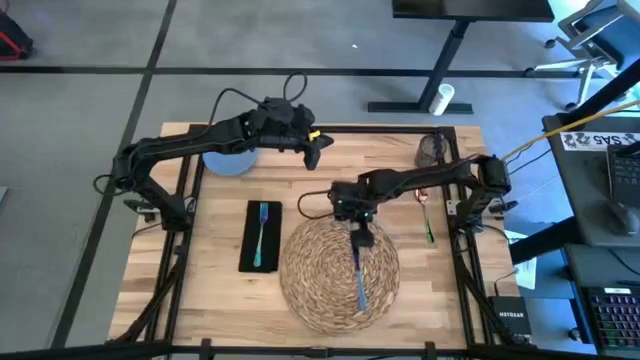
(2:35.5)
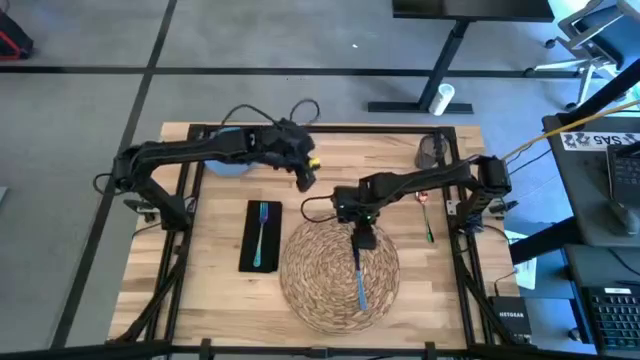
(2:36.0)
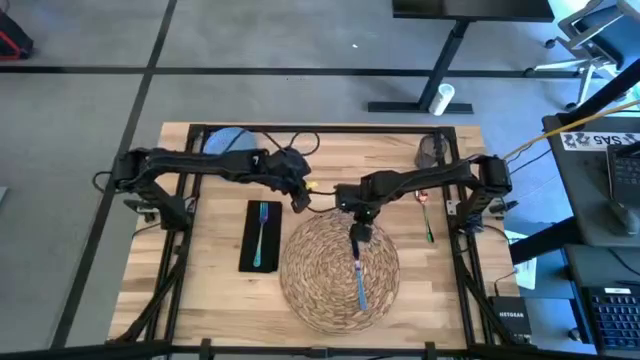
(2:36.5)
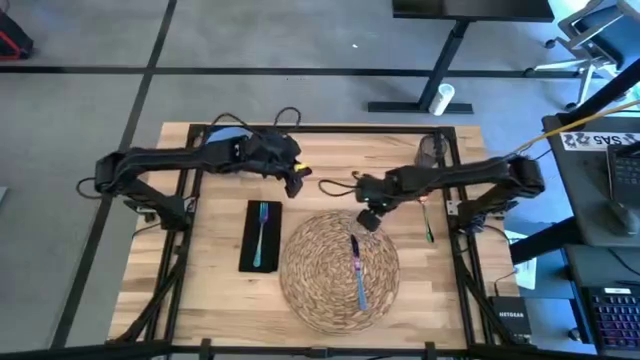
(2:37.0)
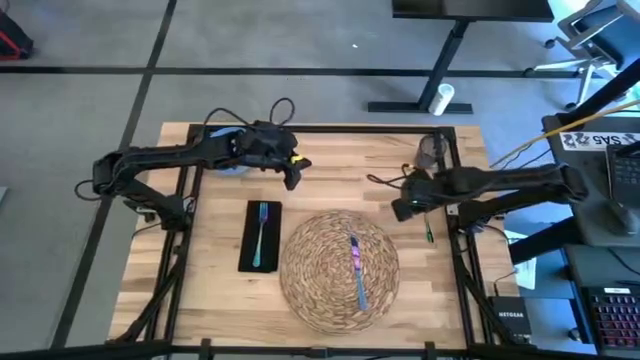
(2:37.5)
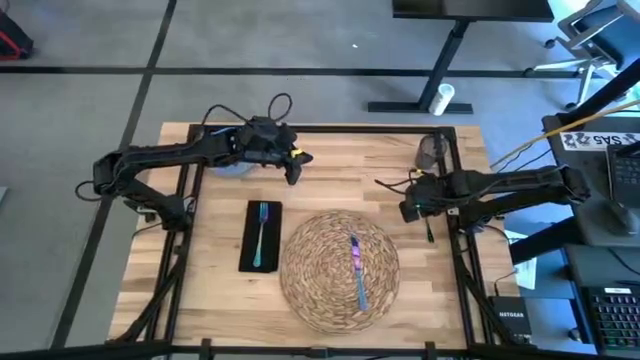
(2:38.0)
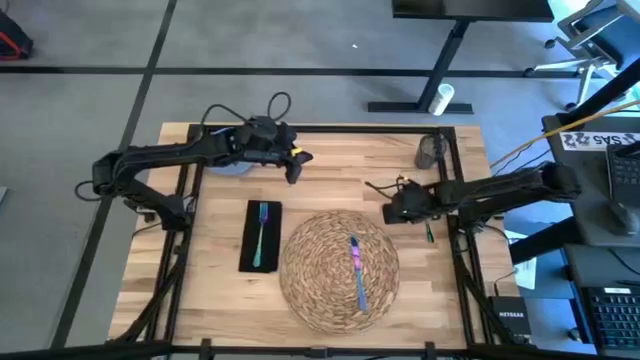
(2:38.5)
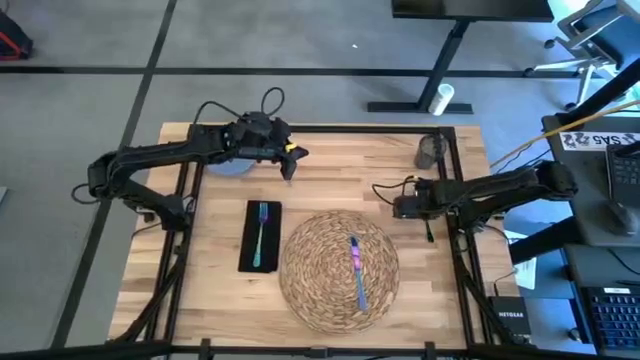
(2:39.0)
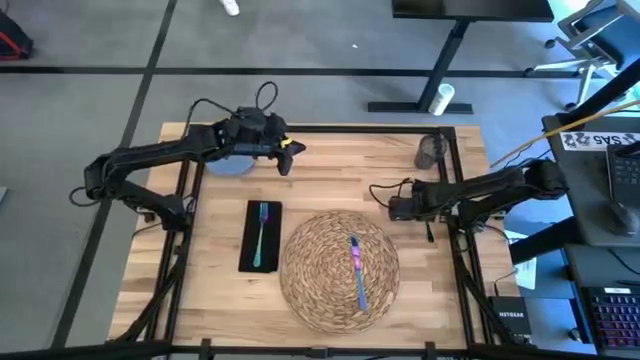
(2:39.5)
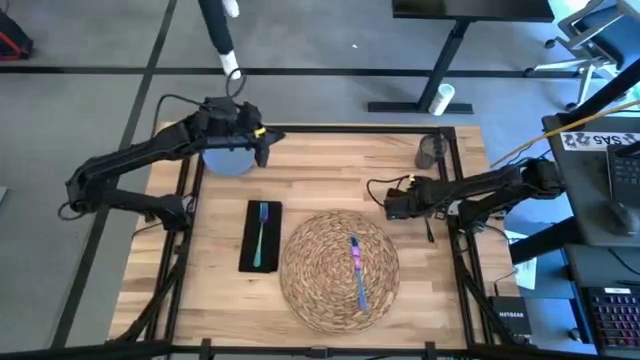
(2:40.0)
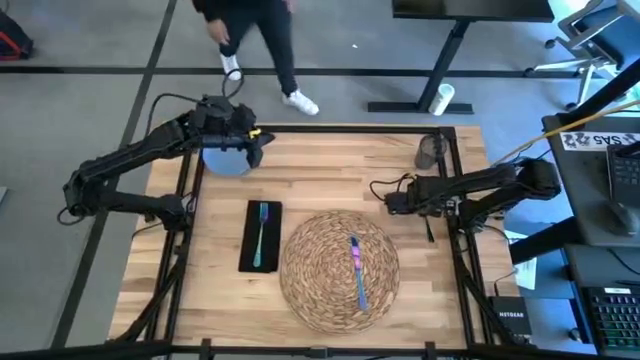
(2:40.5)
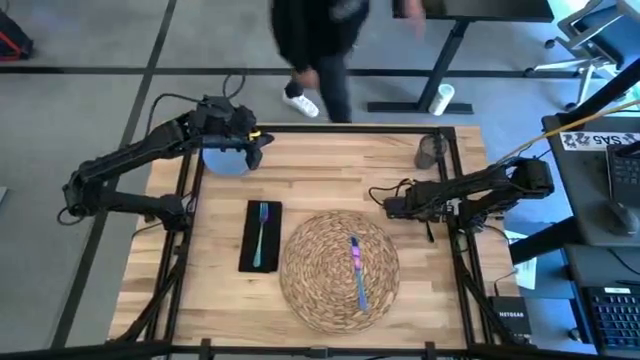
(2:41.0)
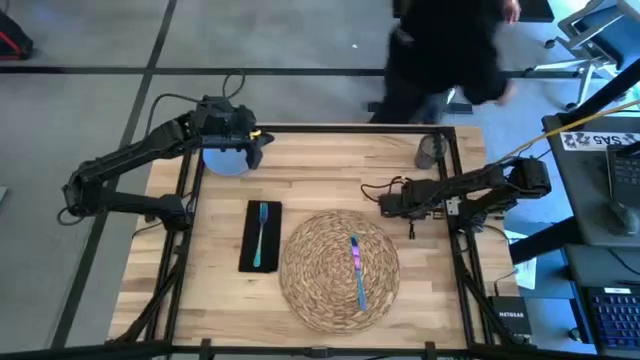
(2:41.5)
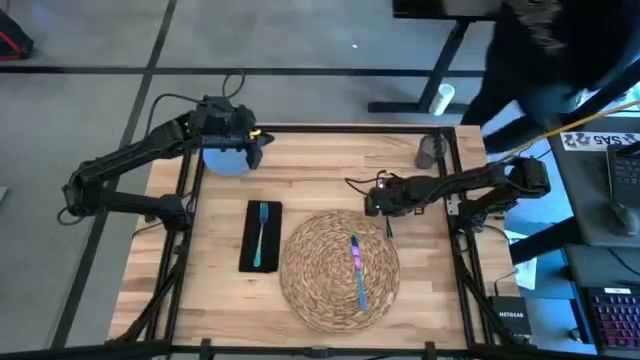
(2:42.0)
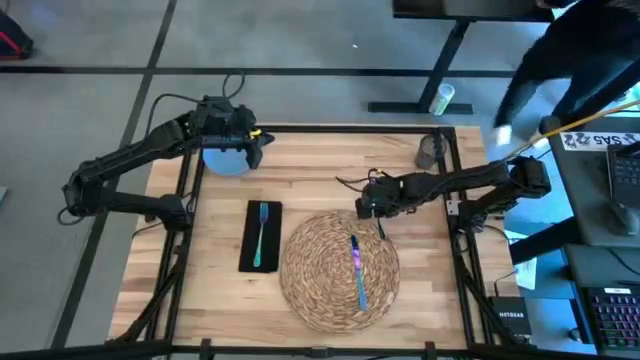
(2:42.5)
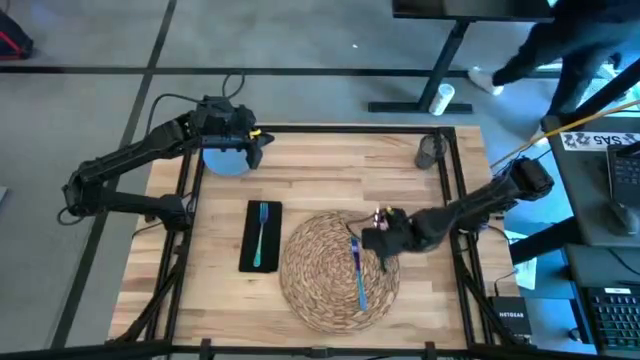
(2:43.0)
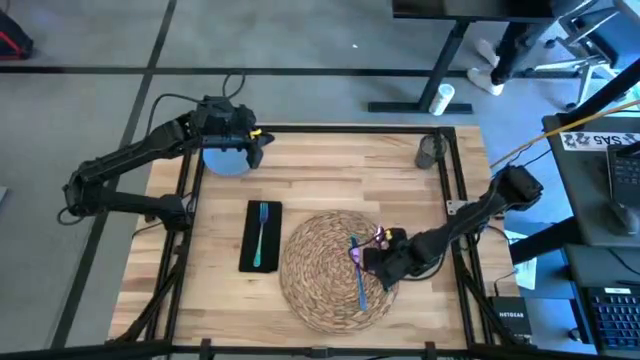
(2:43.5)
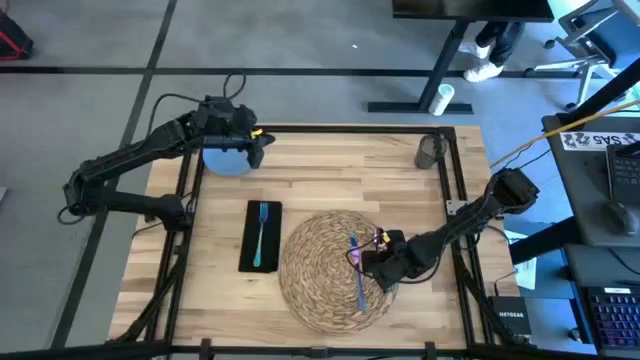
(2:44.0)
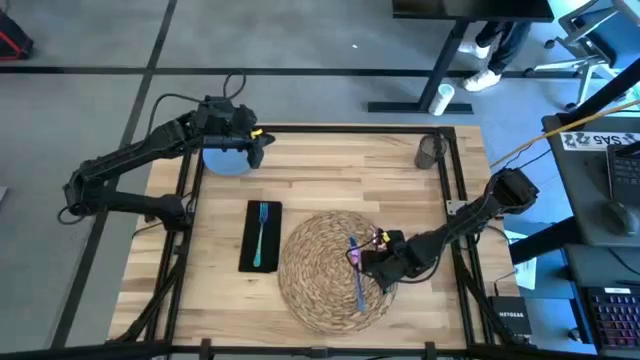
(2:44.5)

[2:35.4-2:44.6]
Task: Set table place
Put the blue spoon on top of the brown placemat to the right of the blue spoon

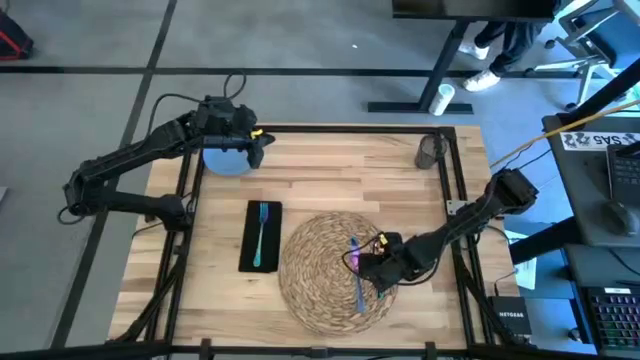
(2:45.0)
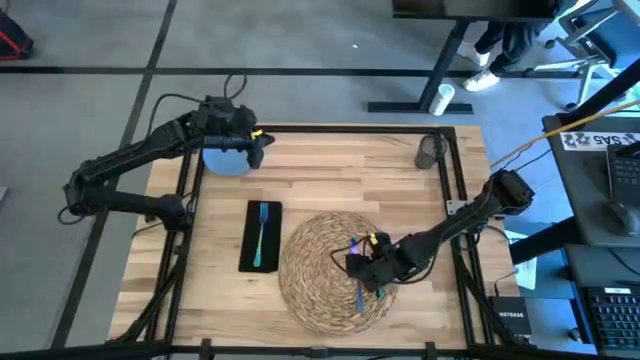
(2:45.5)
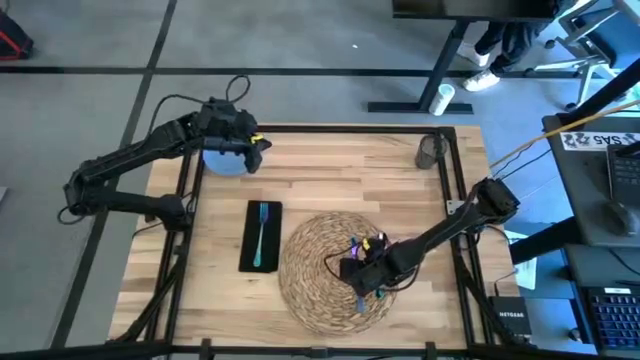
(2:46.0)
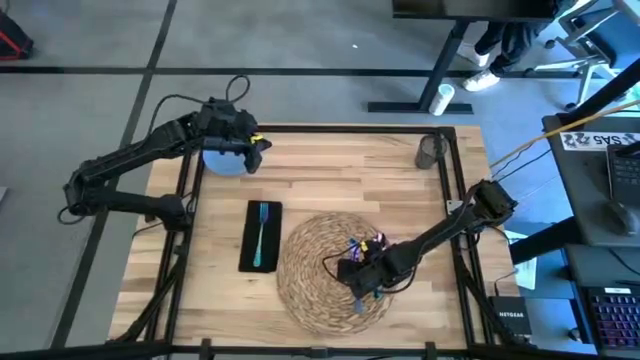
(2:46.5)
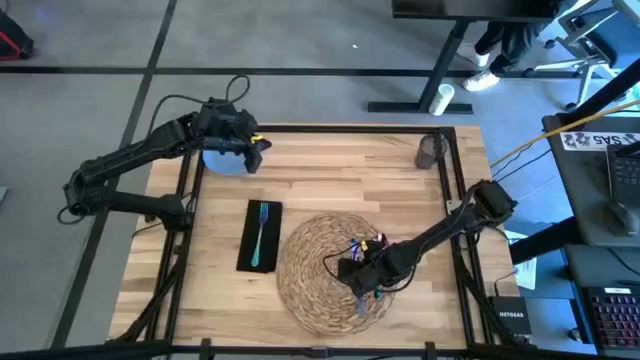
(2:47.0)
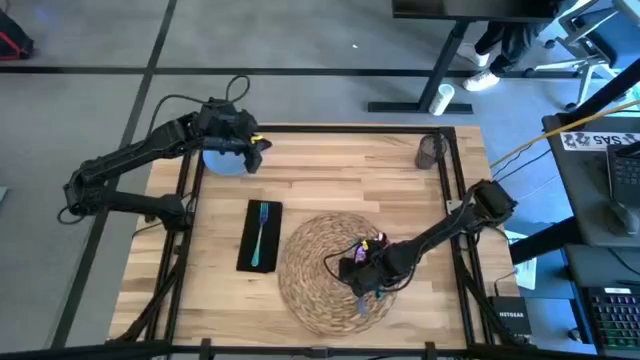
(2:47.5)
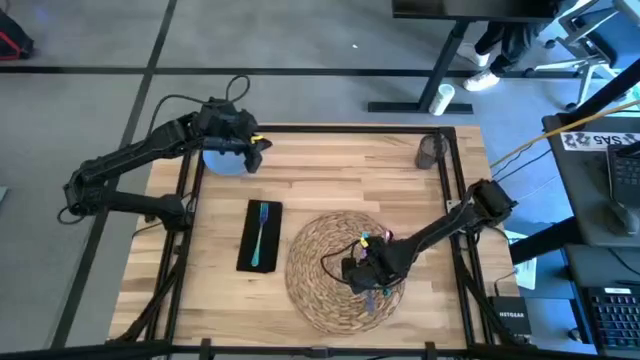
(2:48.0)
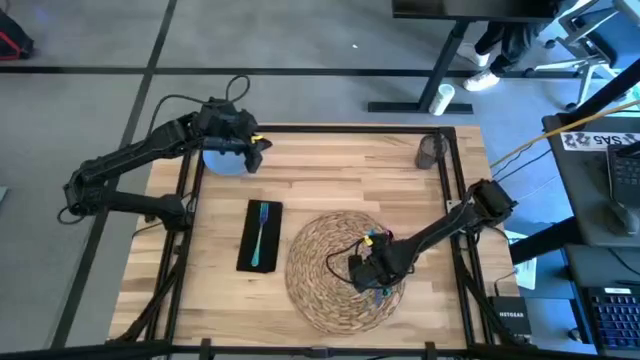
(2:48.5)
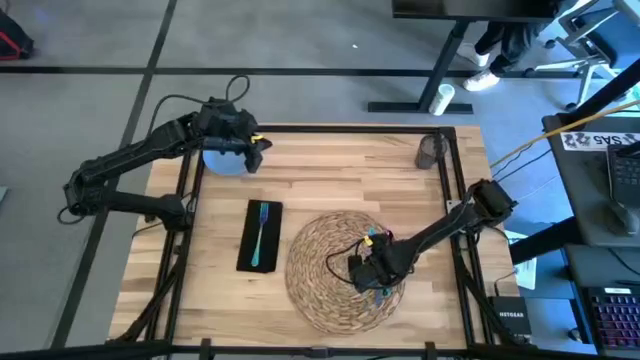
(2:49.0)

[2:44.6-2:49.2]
Adjust the blue table knife on the brown placemat

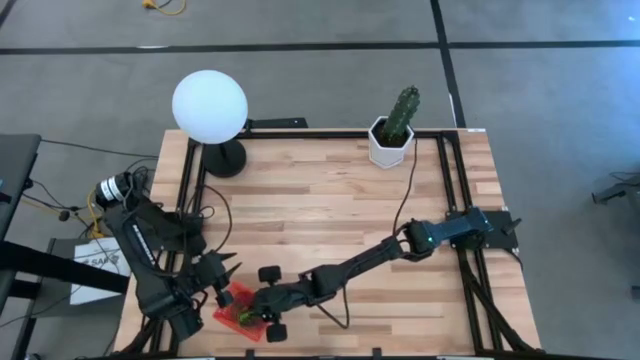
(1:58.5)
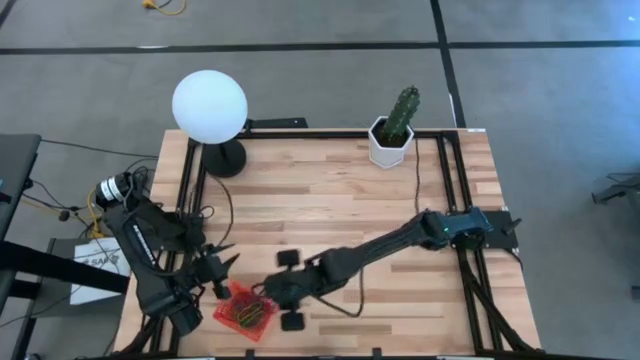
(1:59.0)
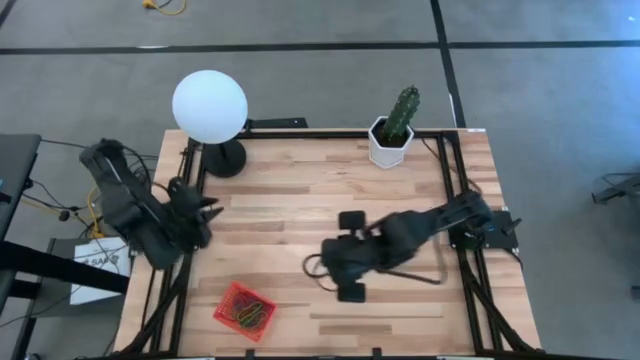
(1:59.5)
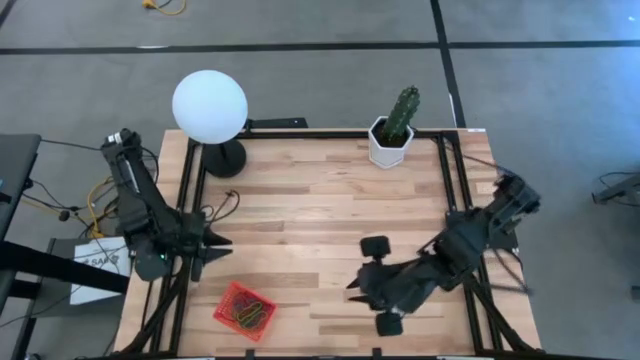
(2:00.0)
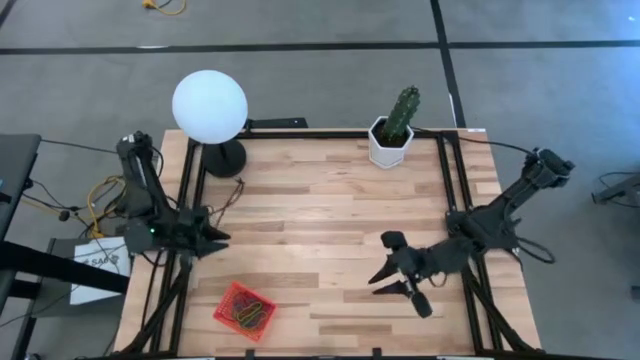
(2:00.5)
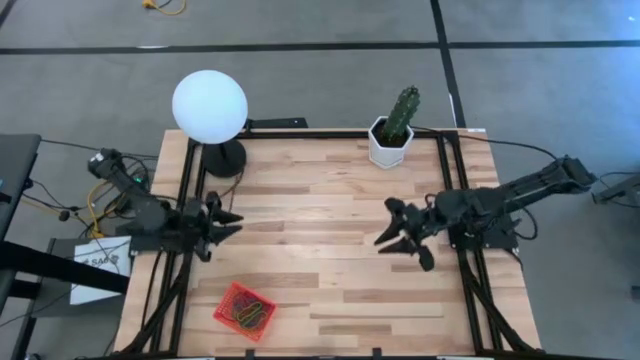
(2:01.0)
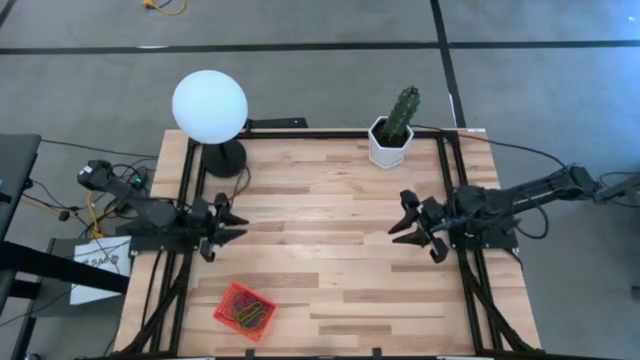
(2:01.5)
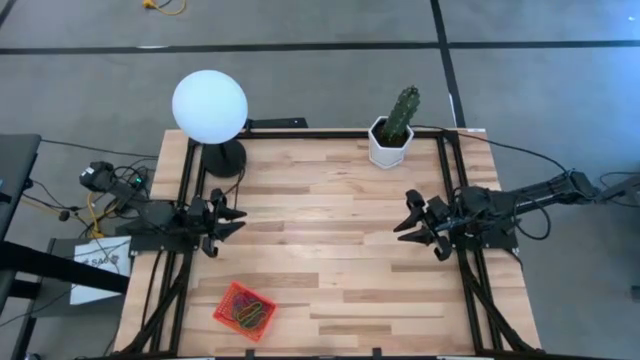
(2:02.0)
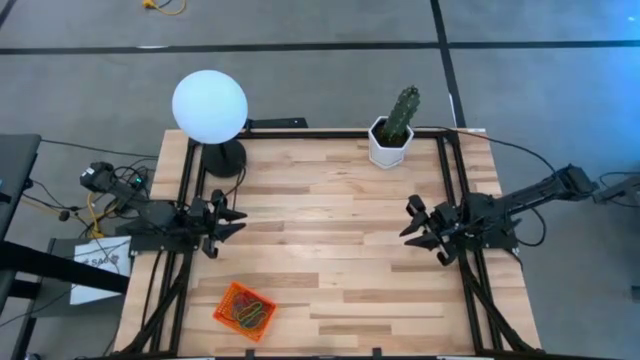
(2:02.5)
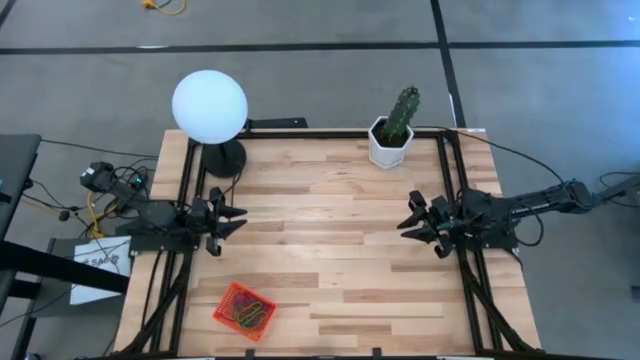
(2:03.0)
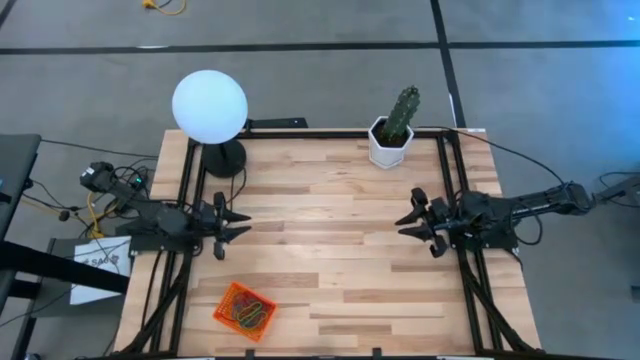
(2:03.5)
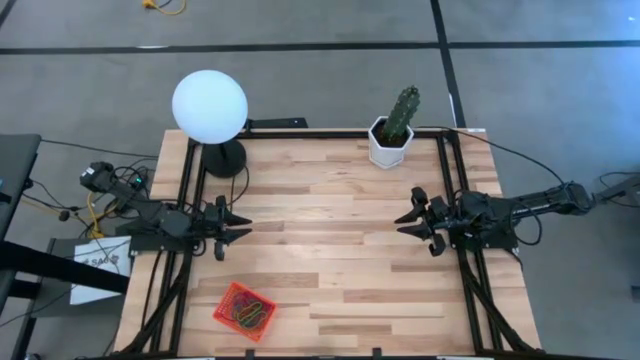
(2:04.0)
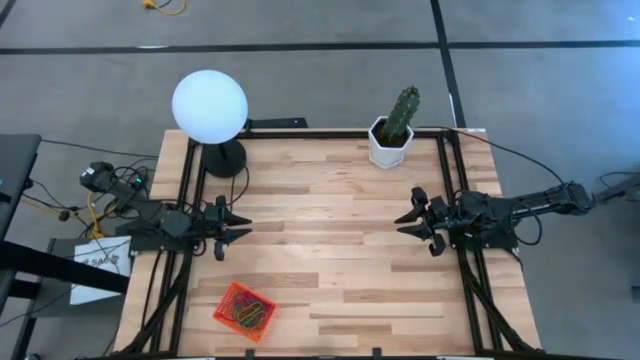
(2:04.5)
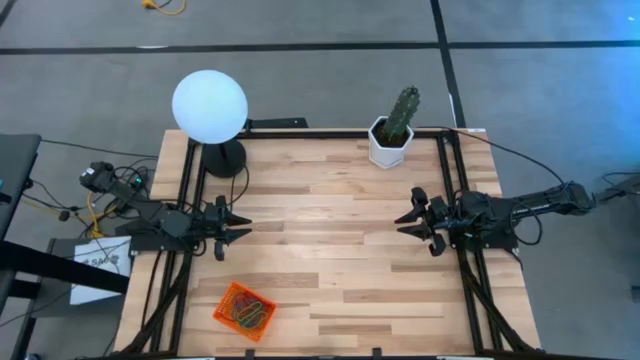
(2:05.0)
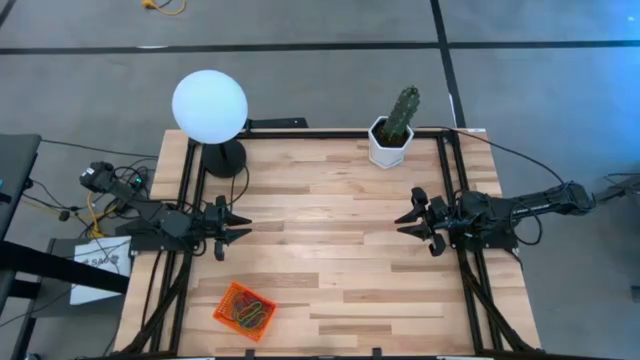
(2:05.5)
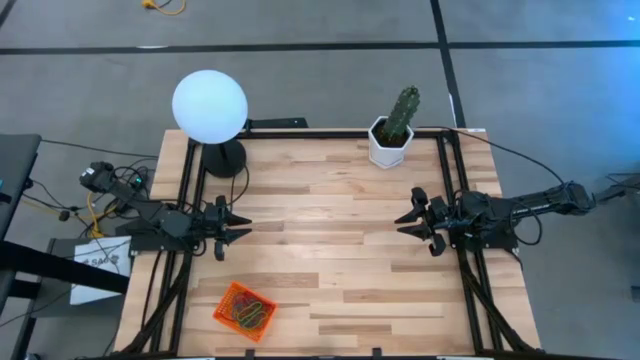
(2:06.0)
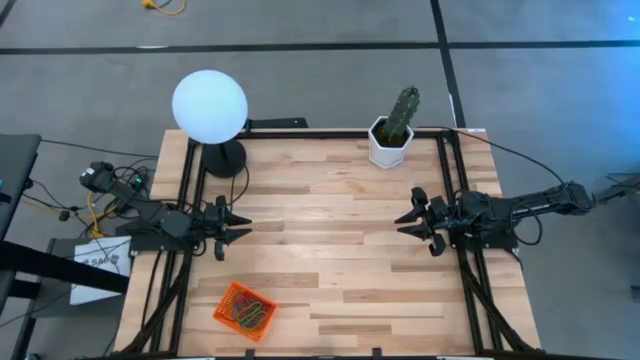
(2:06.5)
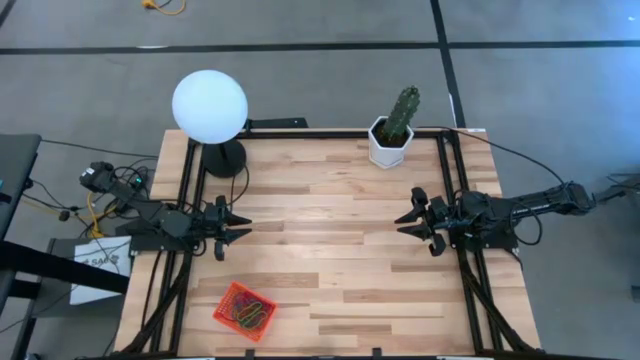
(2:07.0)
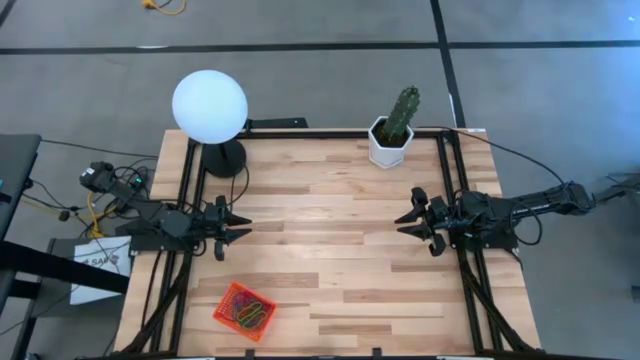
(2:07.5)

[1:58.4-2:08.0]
Task: Pick and place rubber bands into bin
Return to home position
